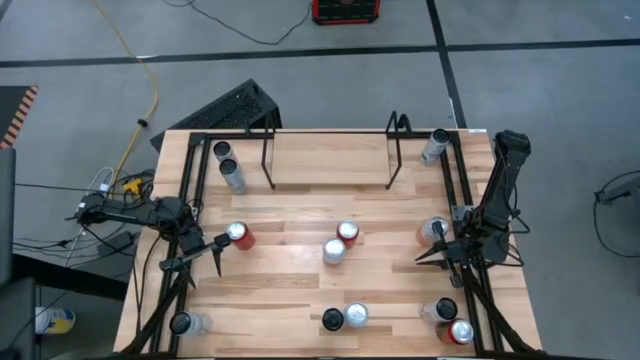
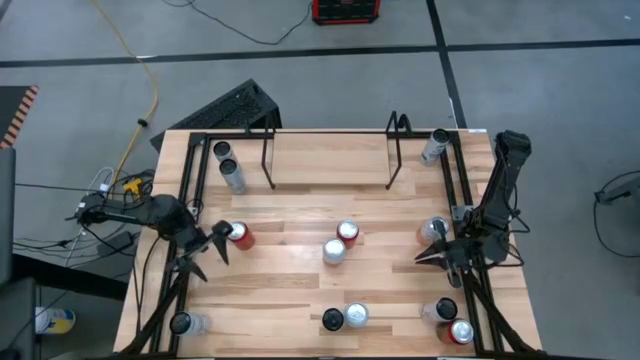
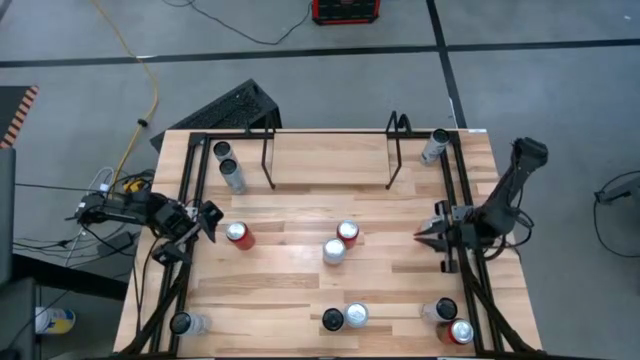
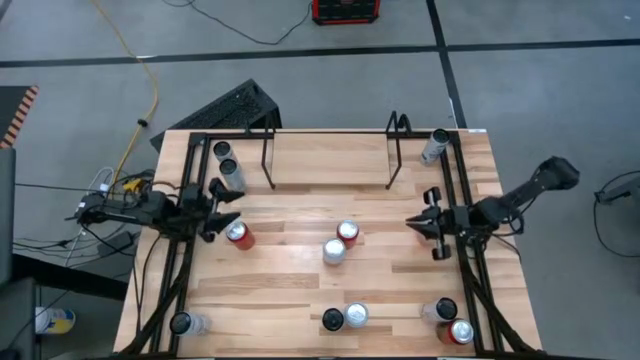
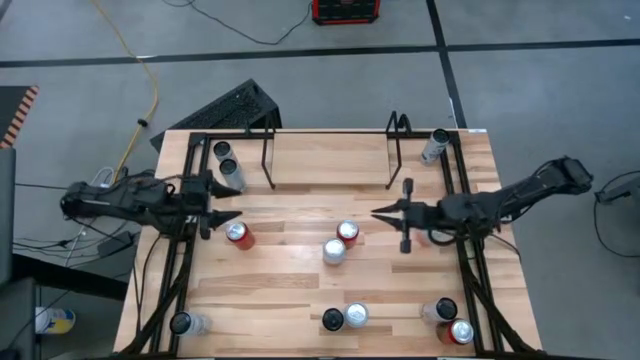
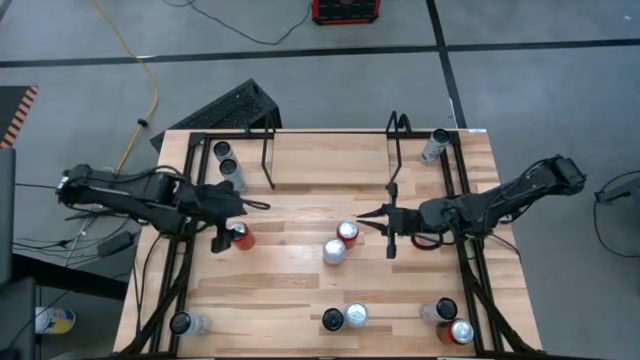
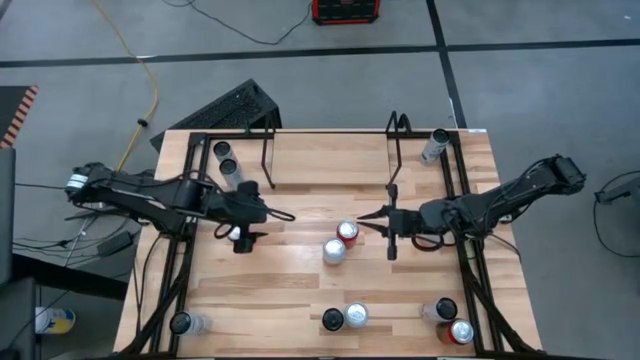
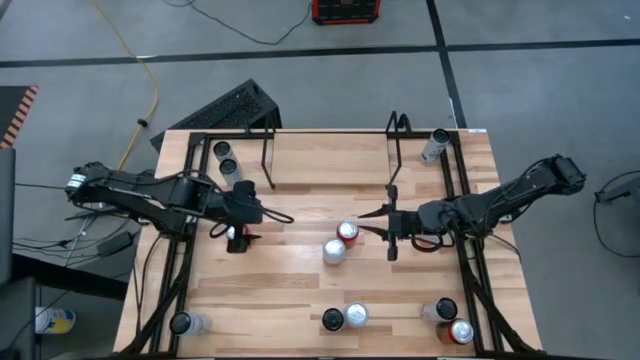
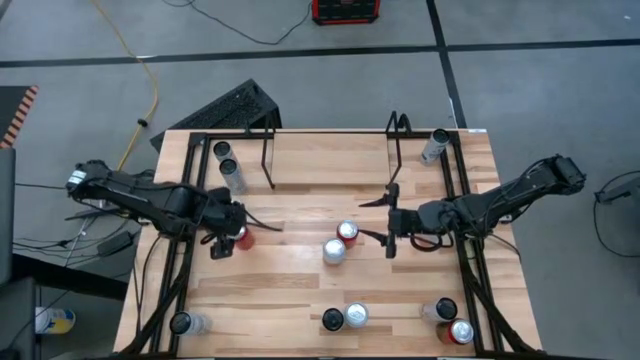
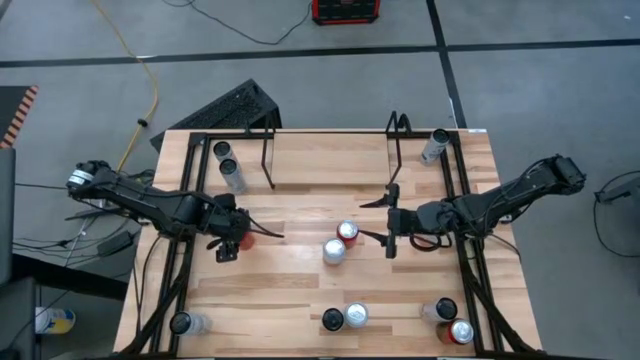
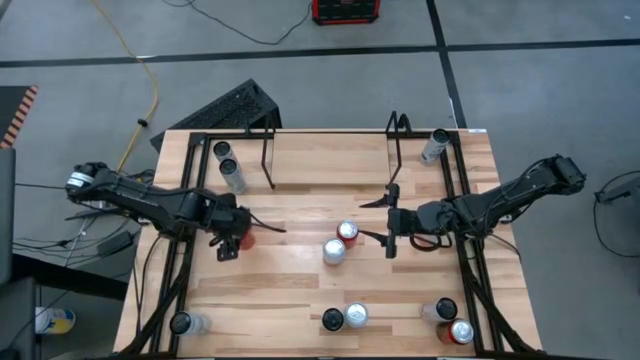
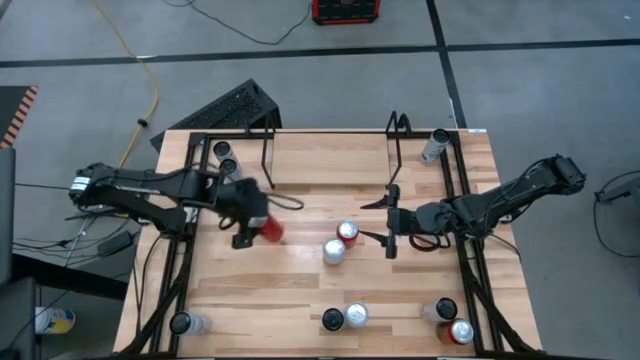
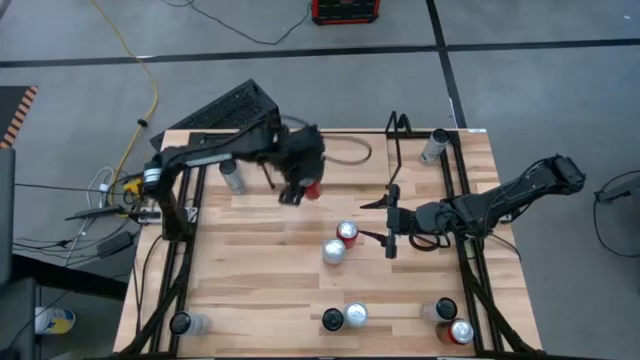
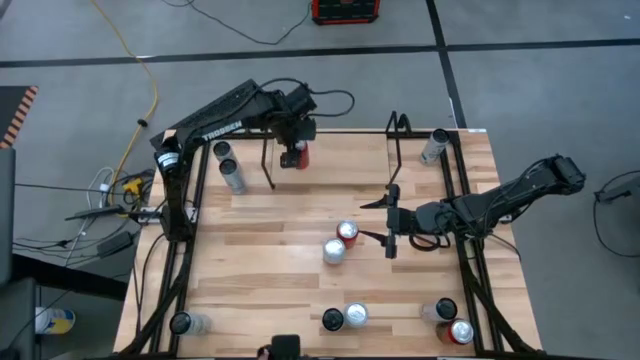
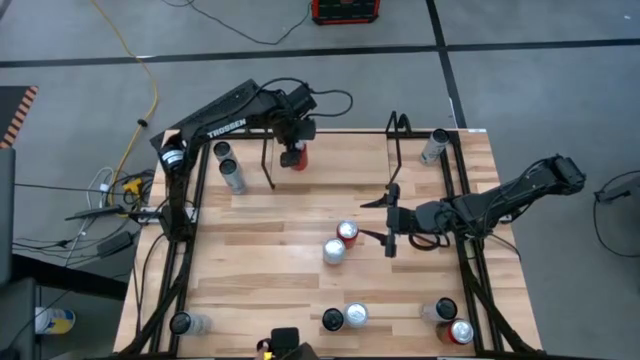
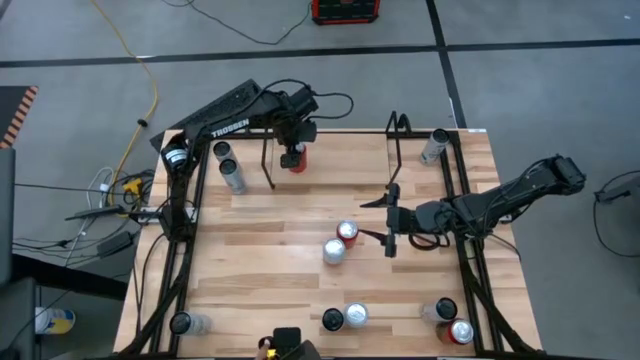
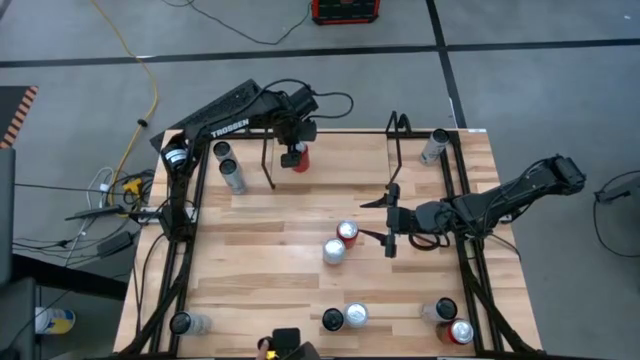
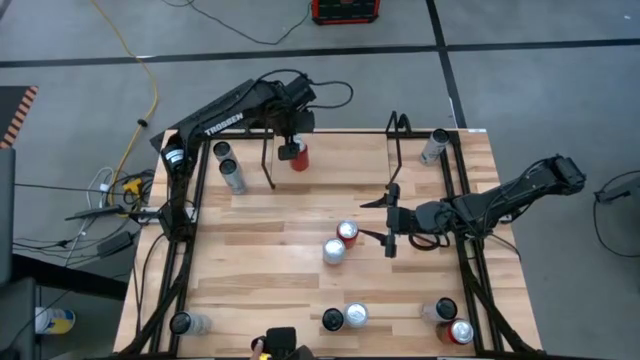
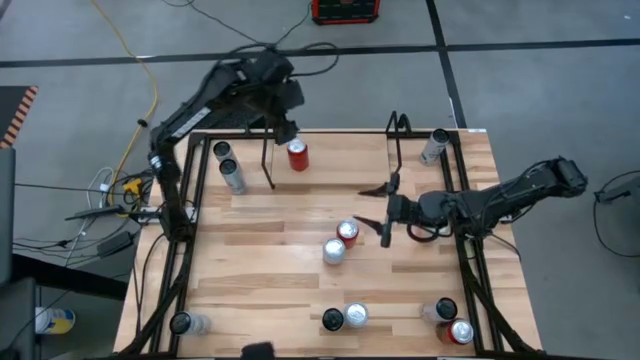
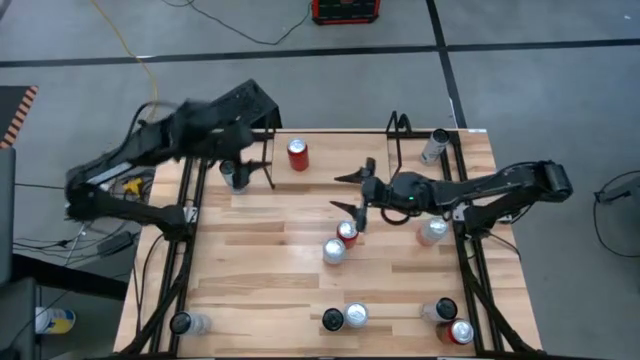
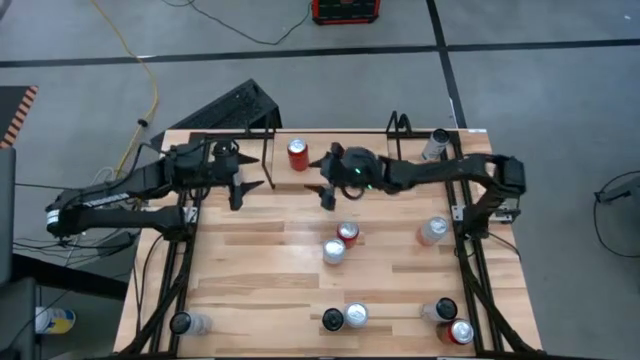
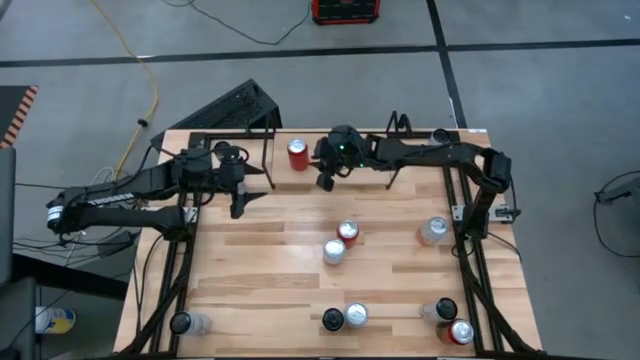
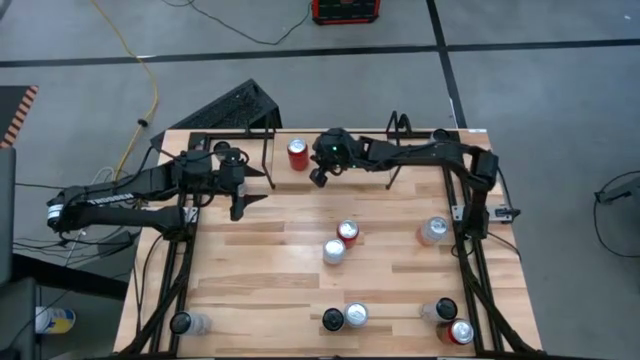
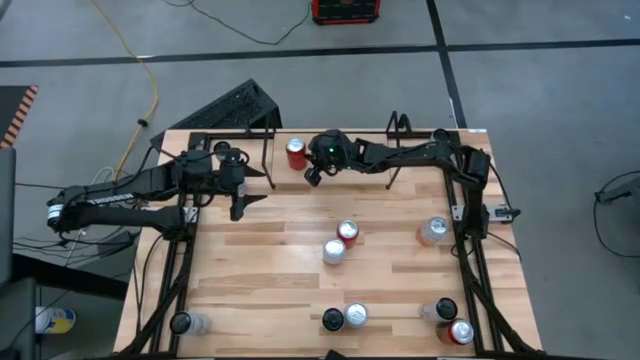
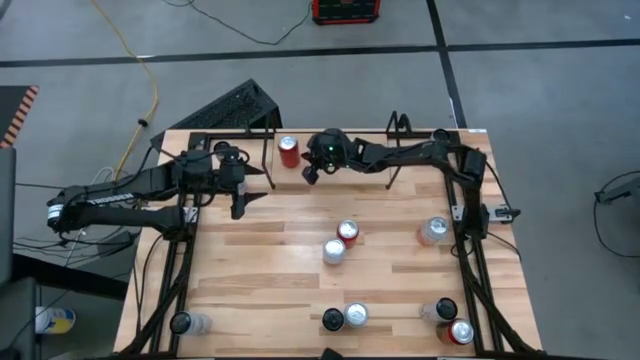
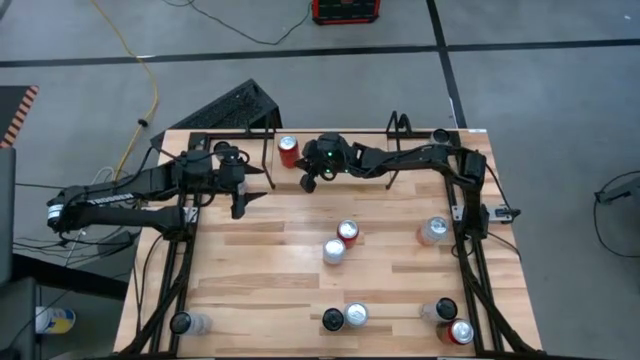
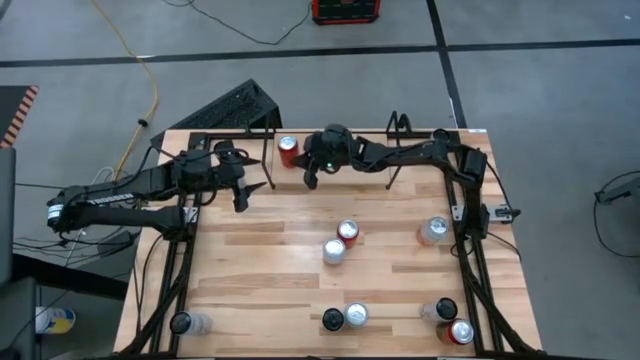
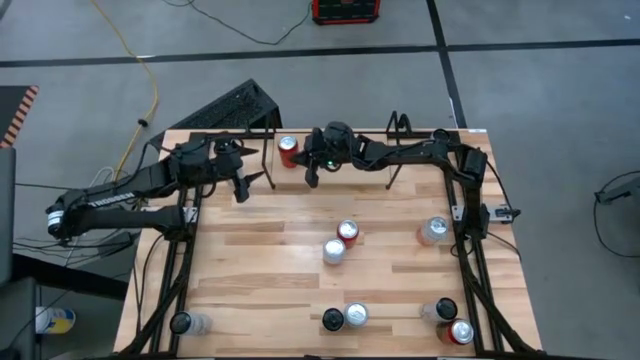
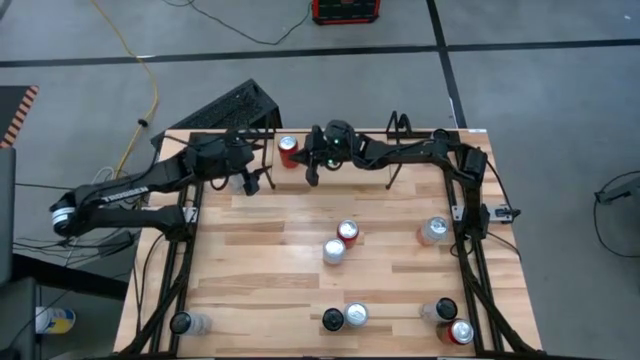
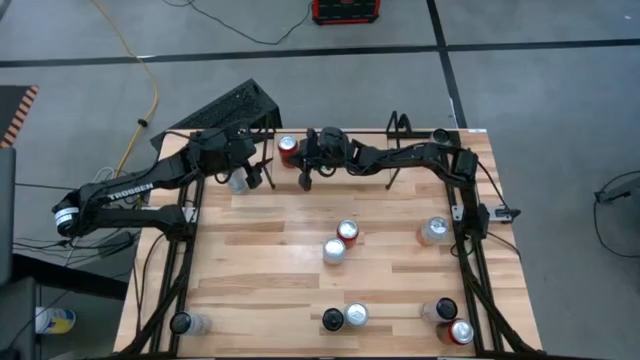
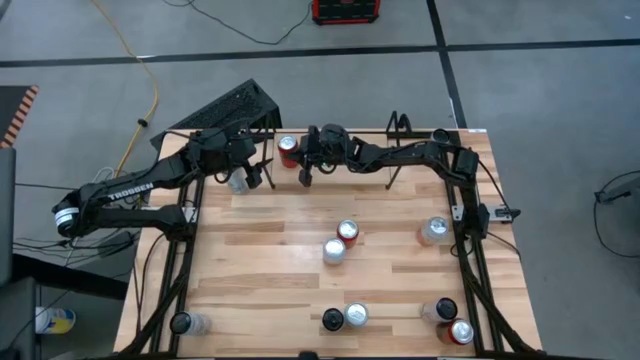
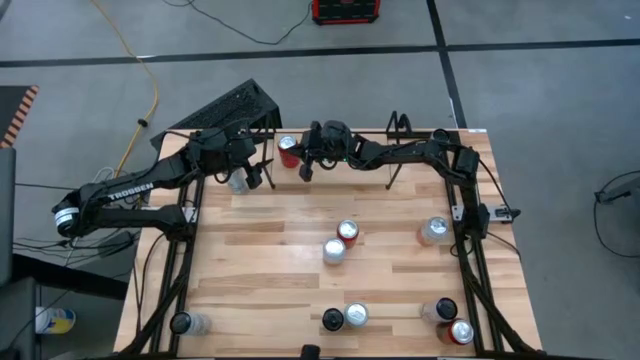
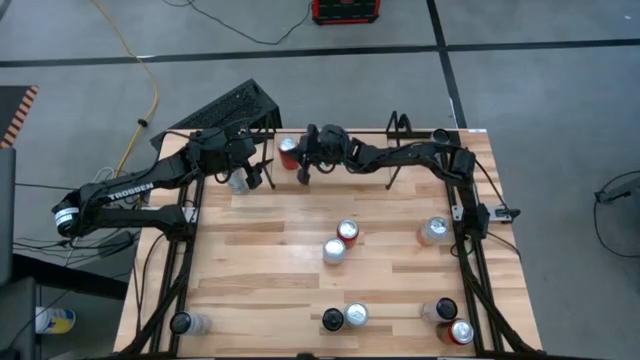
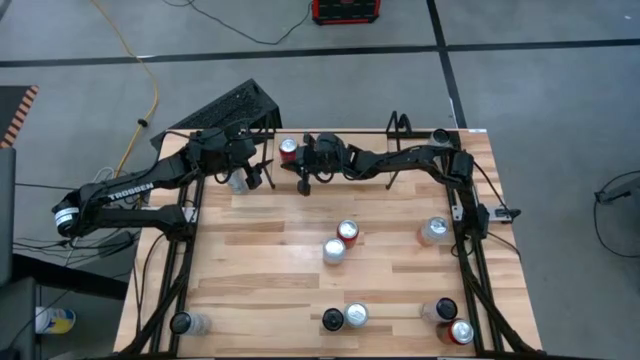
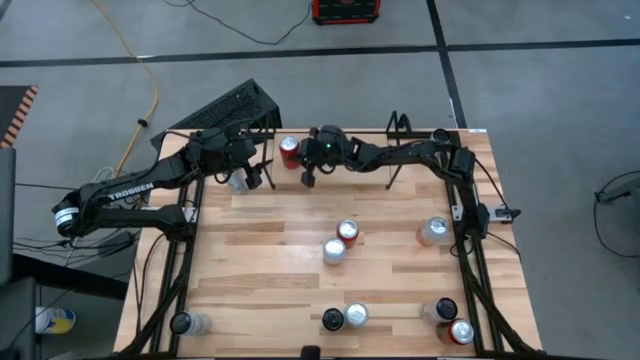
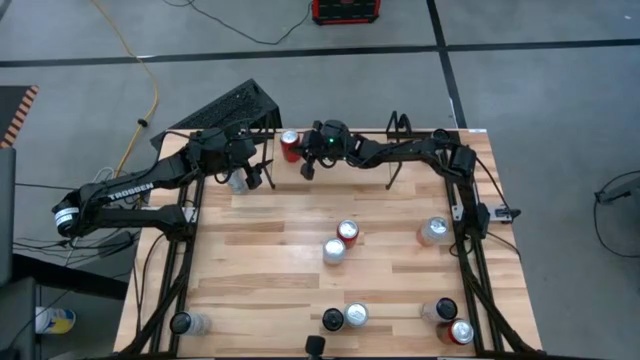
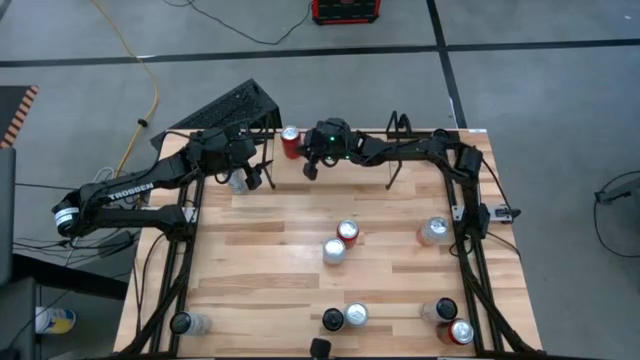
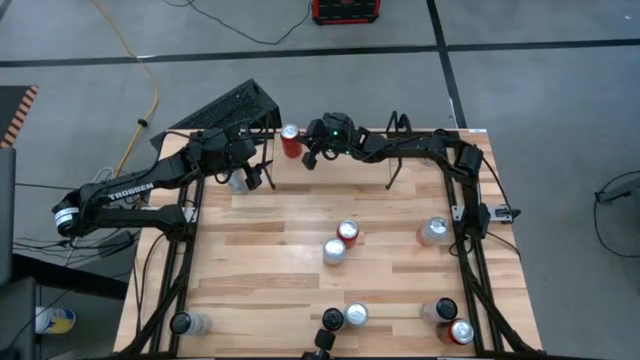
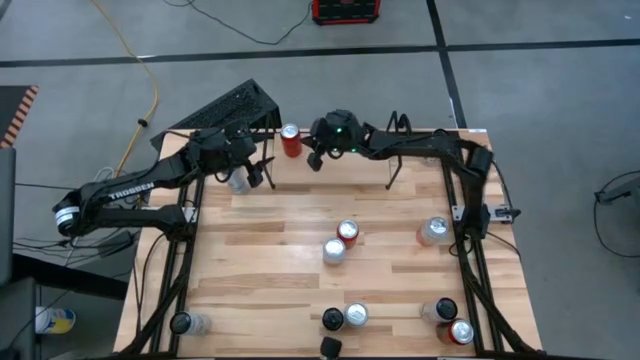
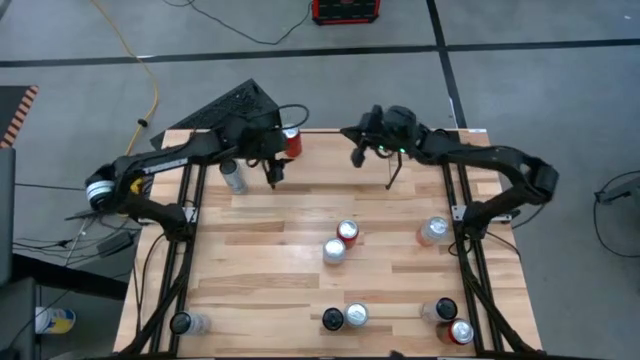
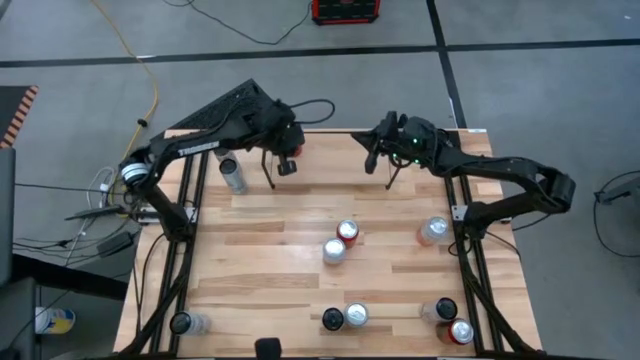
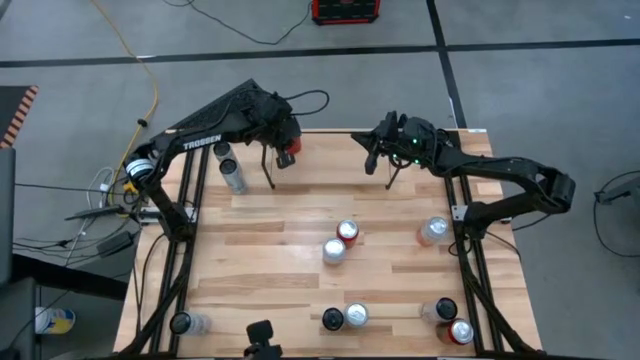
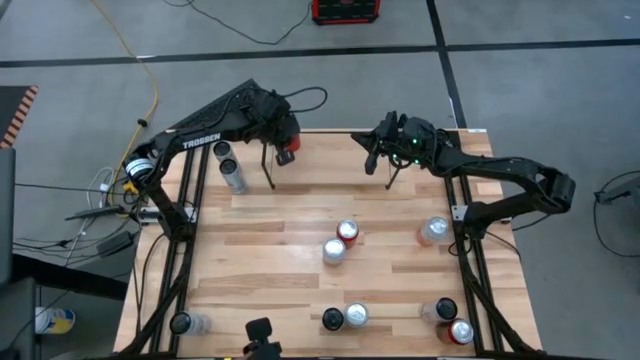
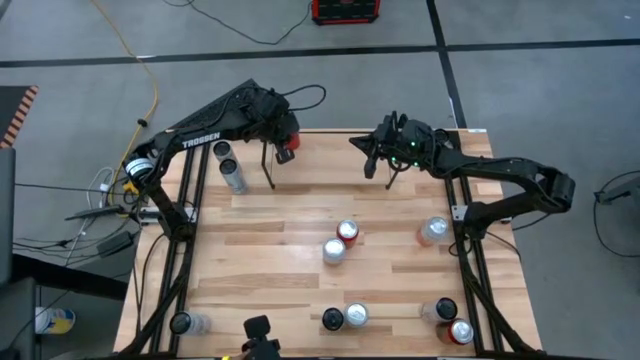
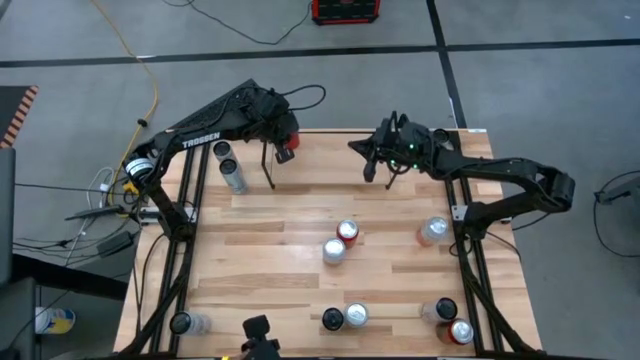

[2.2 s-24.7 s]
Task: Place canned beverage on shelf
Put the top left red black soda can on the shelf
